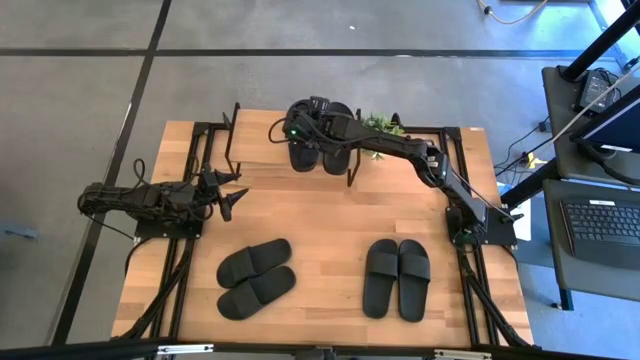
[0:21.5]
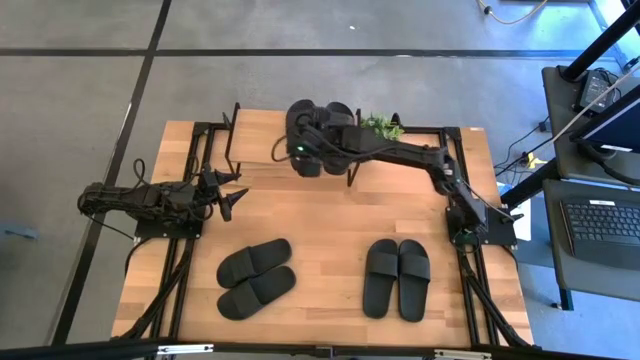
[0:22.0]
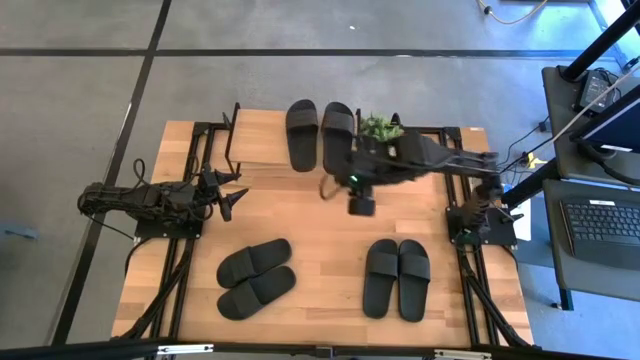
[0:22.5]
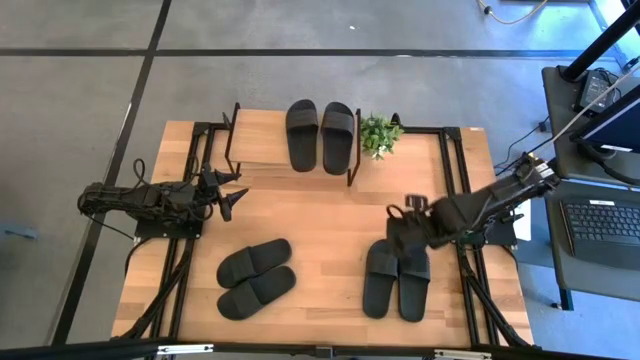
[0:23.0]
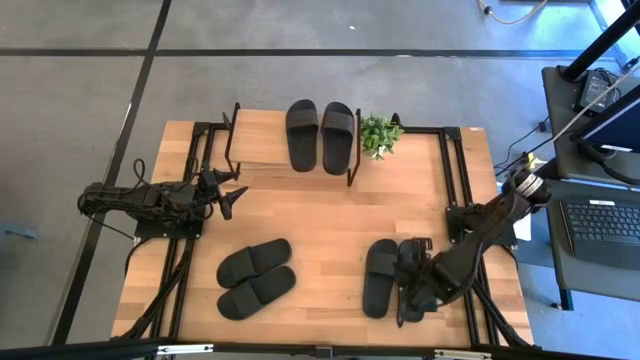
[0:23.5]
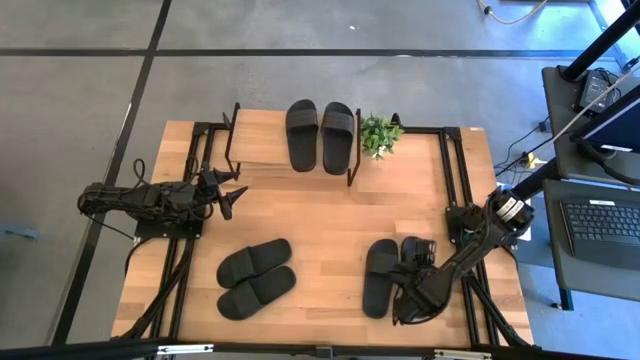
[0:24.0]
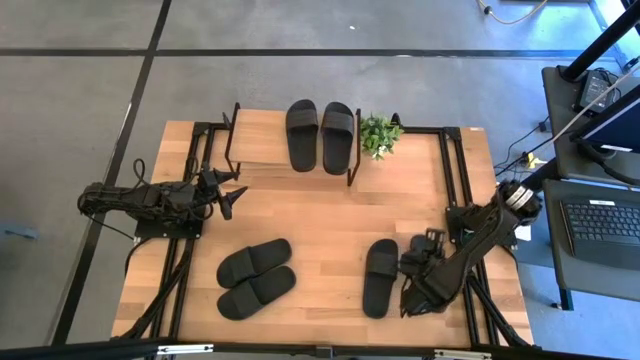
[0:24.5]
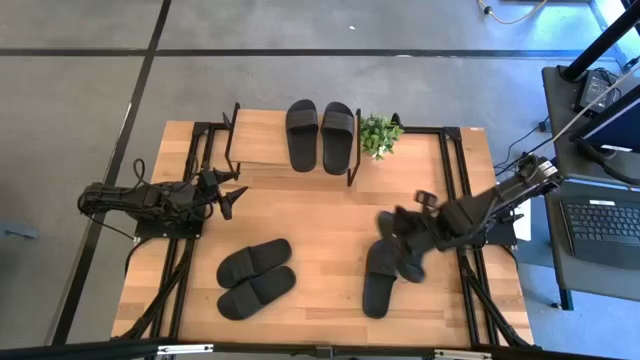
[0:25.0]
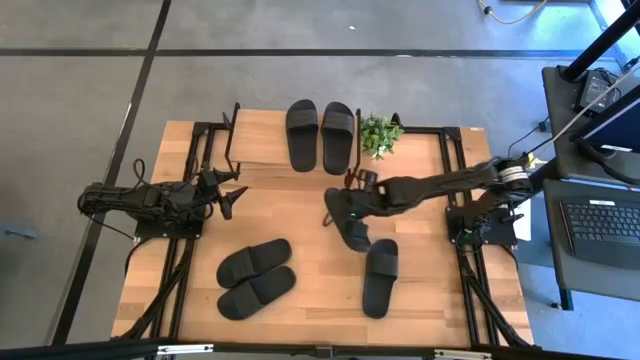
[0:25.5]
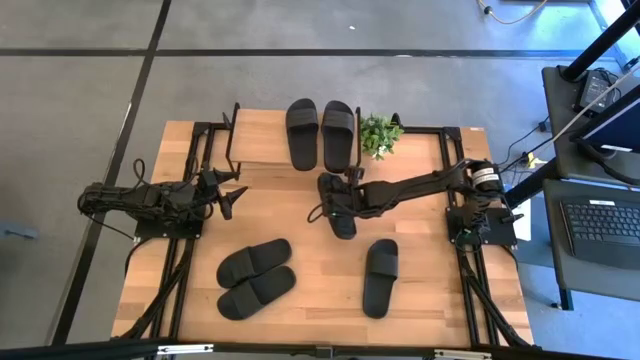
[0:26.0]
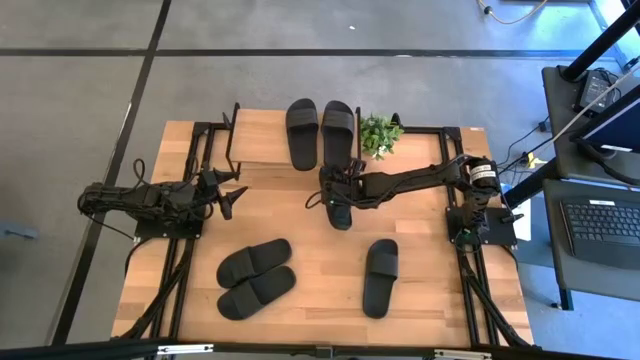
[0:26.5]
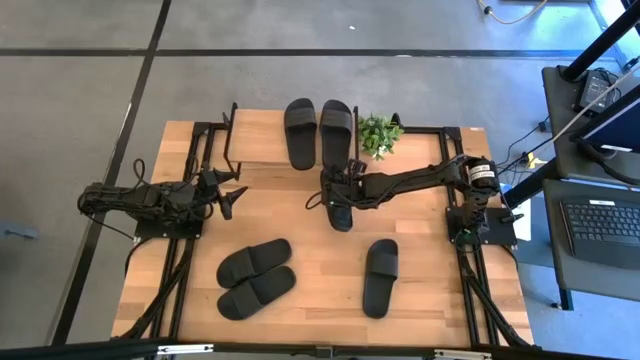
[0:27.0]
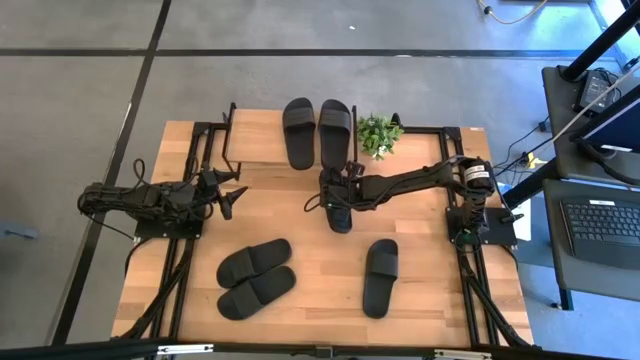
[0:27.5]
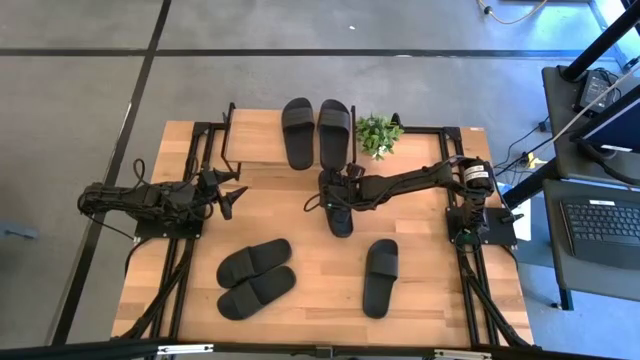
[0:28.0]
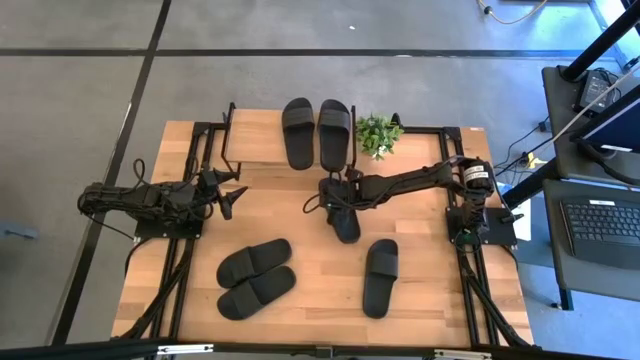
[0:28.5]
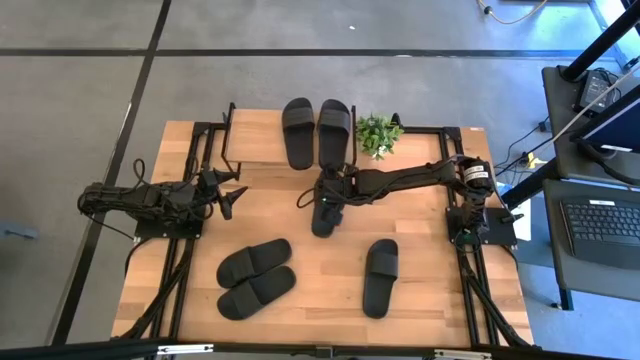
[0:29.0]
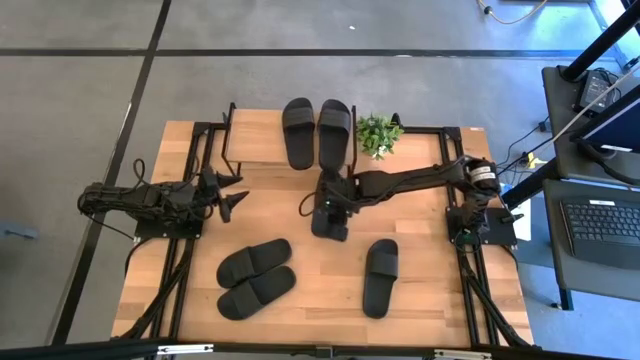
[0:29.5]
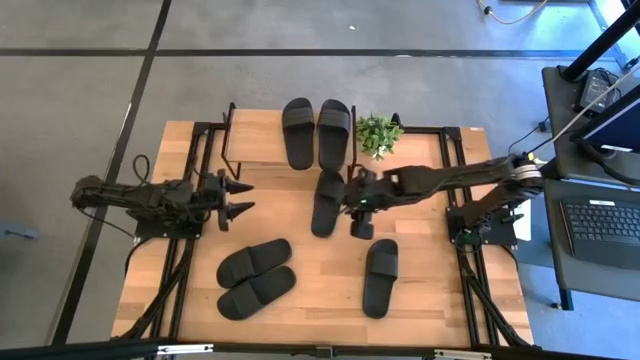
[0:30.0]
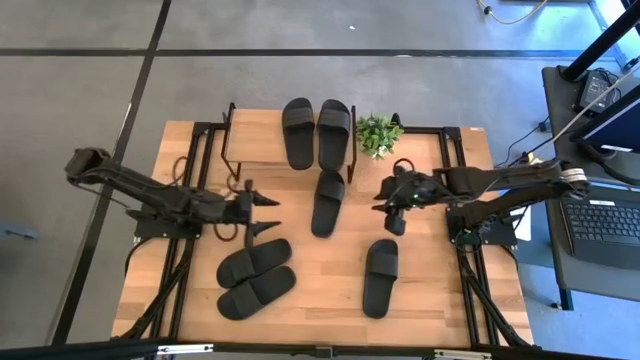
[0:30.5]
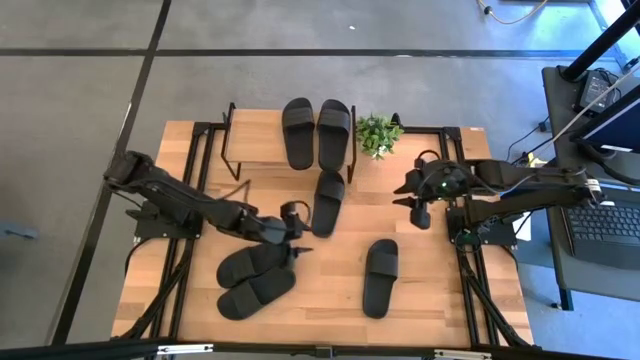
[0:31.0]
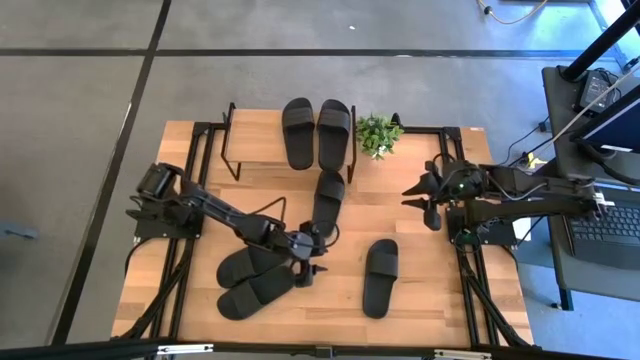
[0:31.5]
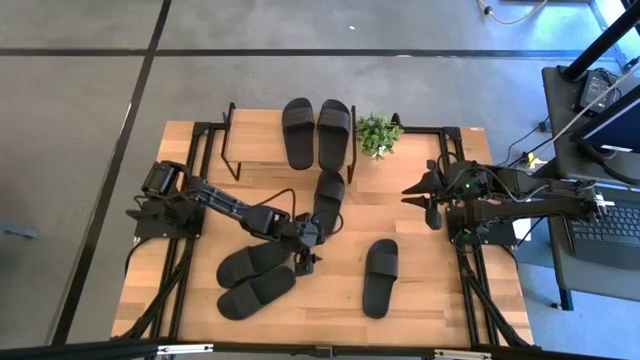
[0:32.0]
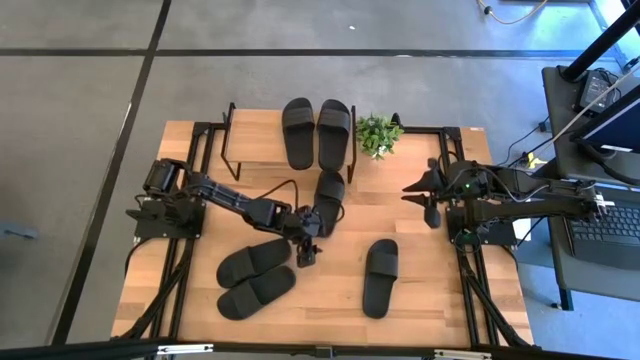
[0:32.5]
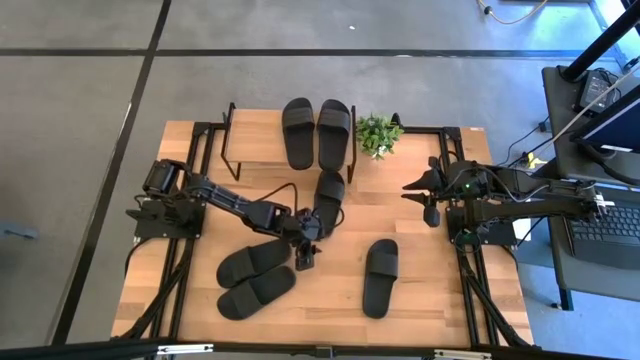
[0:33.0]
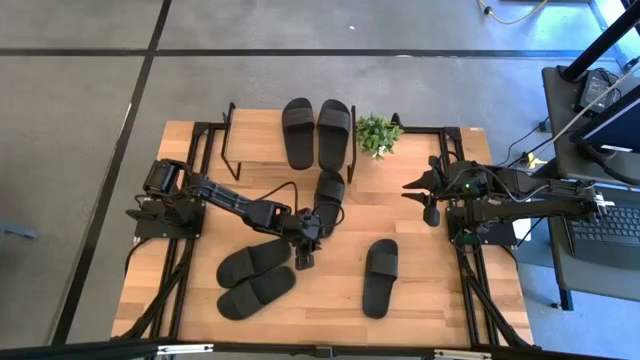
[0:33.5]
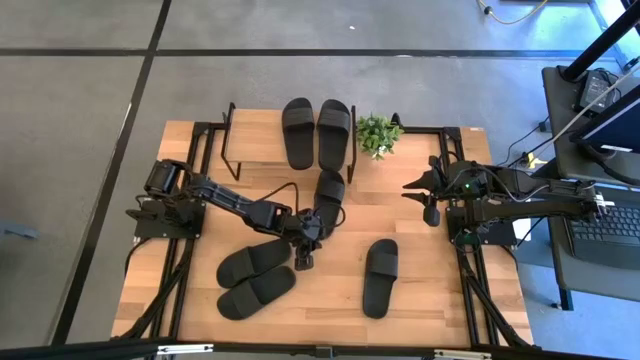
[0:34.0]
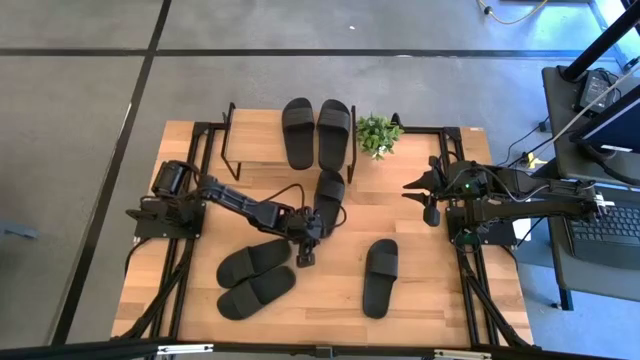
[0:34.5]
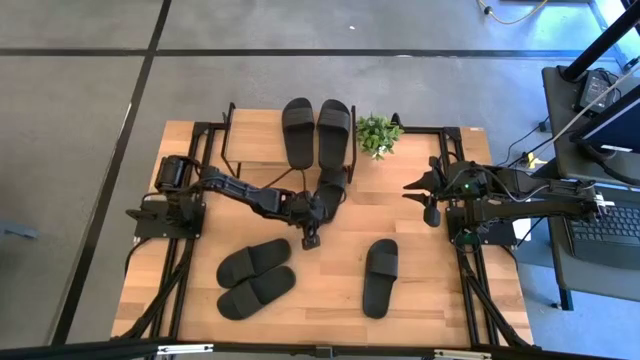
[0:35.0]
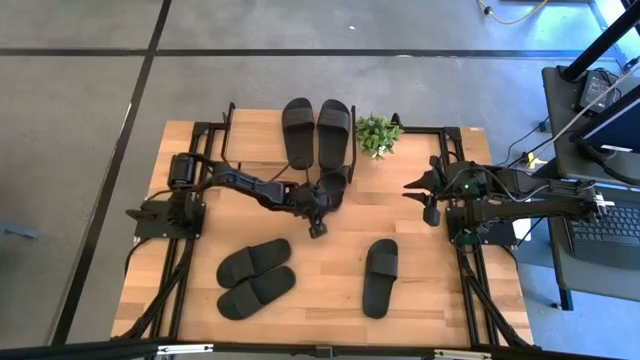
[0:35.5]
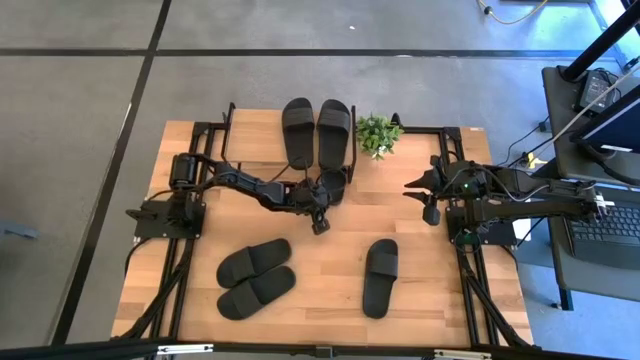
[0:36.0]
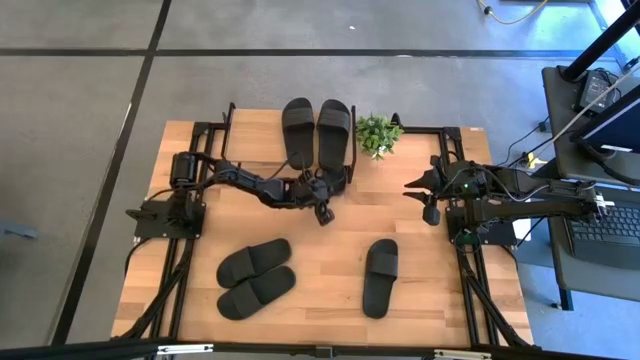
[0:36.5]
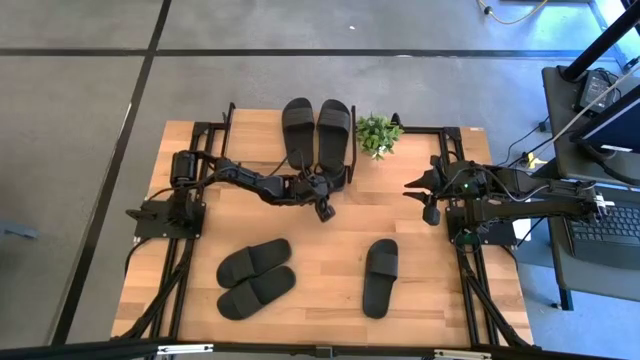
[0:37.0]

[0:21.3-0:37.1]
Task: Pick and place slides into the shelf
Put the black slide under the shelf

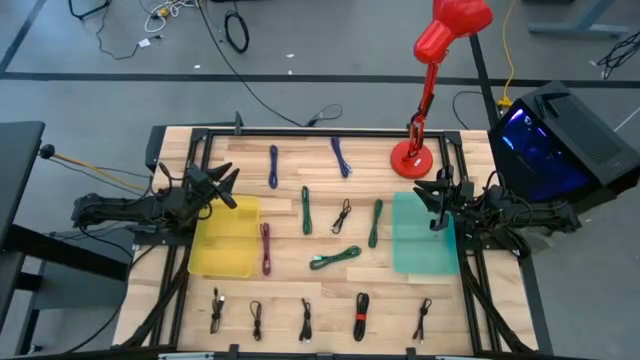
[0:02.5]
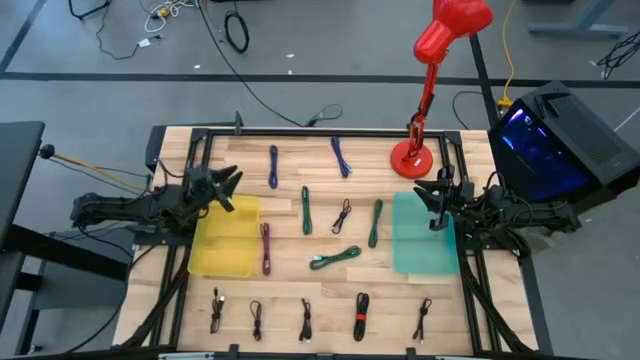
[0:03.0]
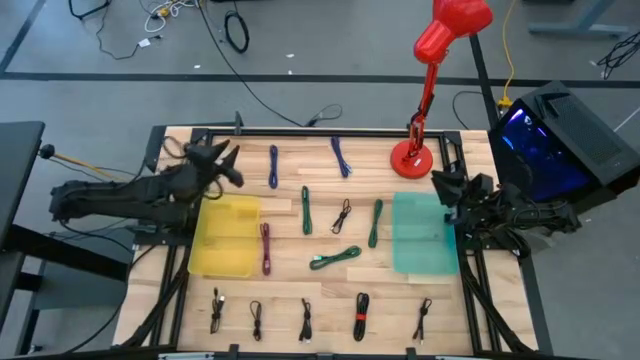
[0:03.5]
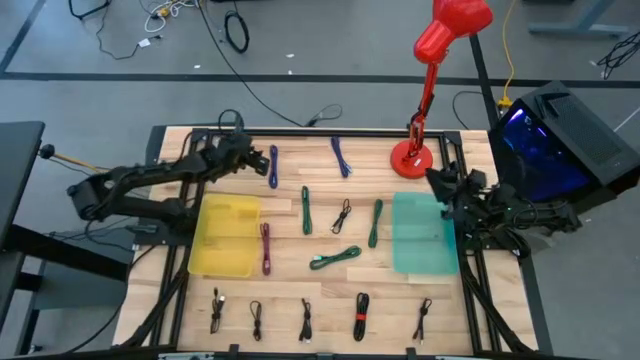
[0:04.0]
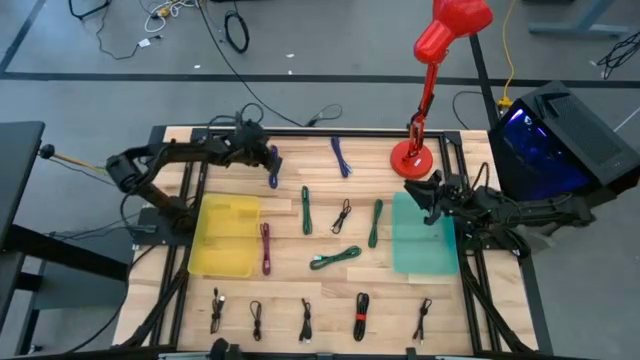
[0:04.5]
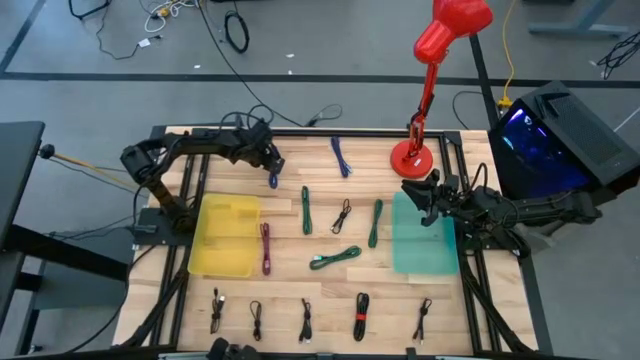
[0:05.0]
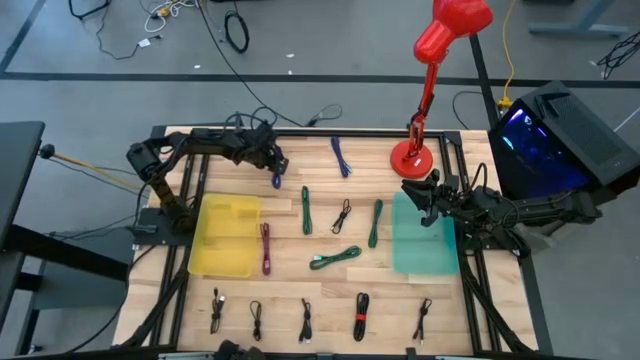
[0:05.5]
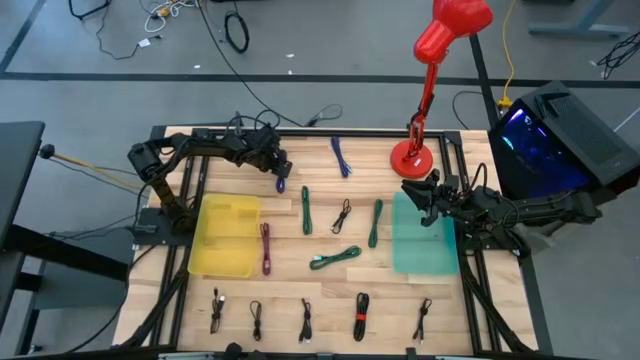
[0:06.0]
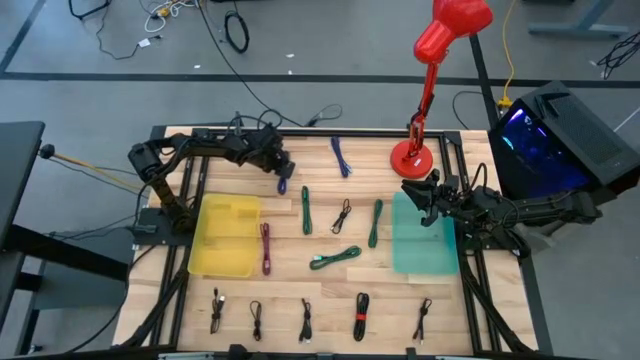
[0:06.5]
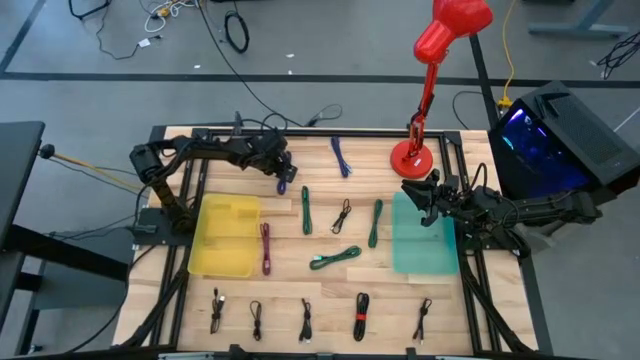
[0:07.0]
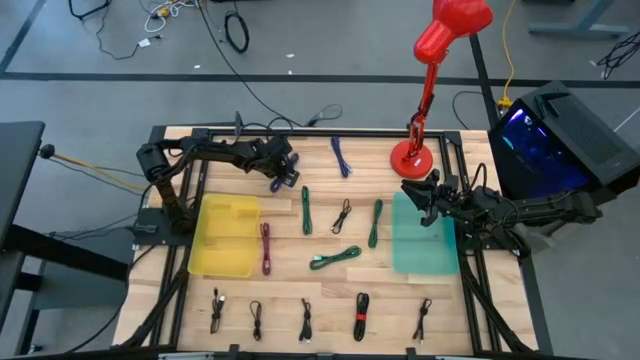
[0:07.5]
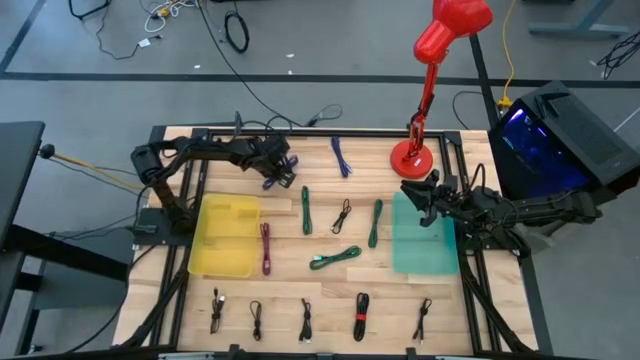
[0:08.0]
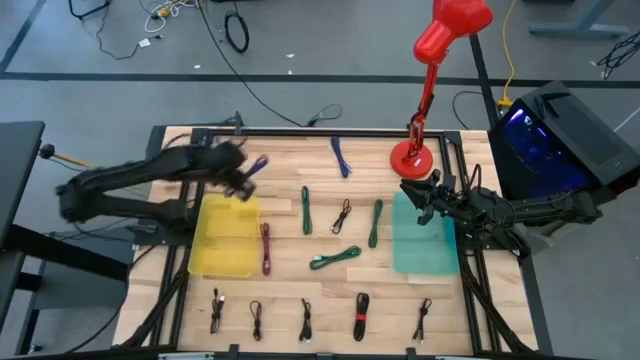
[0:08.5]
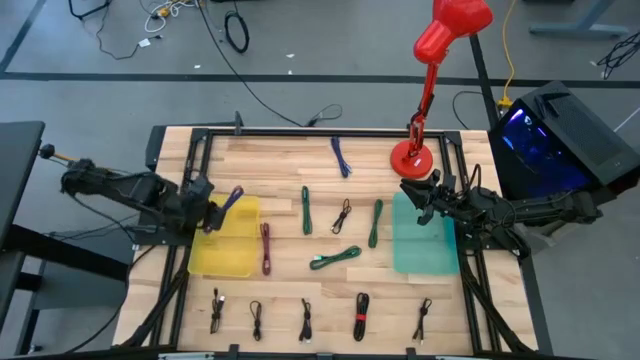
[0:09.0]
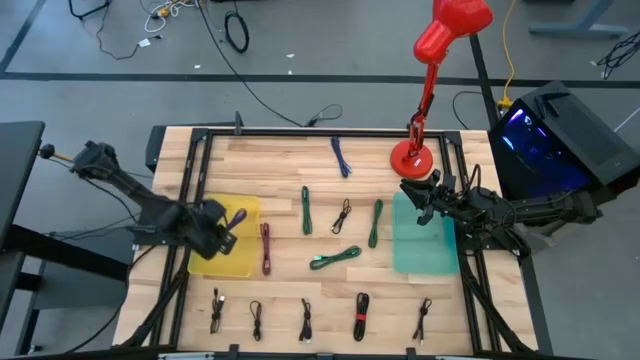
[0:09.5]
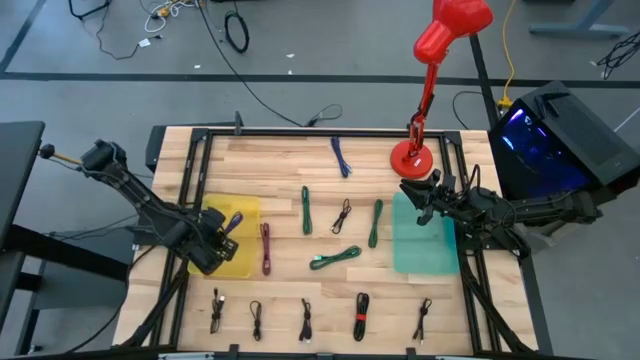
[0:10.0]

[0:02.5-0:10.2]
Task: Pick & Place USB Port
Put the black and blue charger cable into the yellow bin
